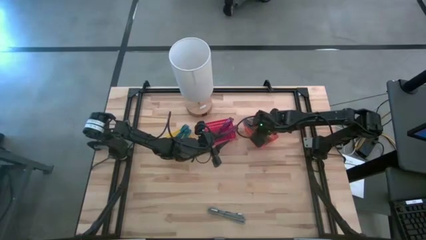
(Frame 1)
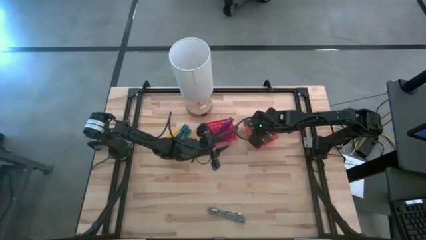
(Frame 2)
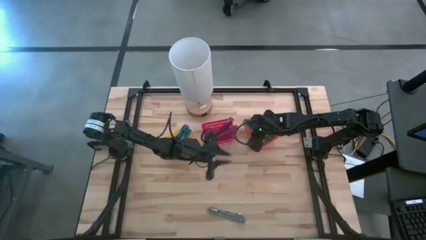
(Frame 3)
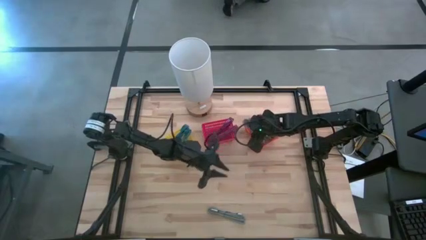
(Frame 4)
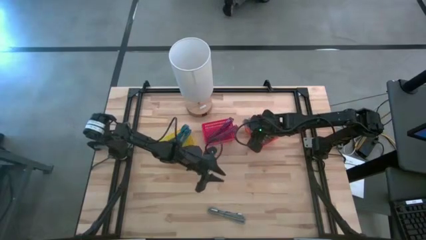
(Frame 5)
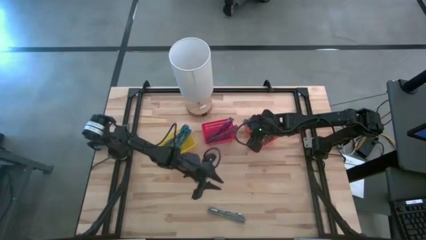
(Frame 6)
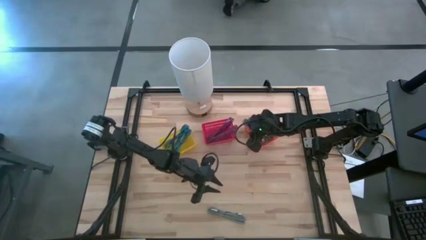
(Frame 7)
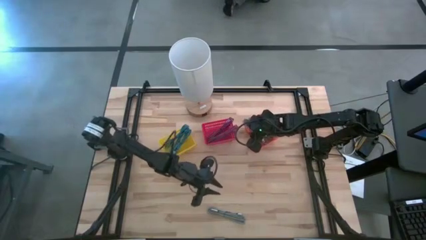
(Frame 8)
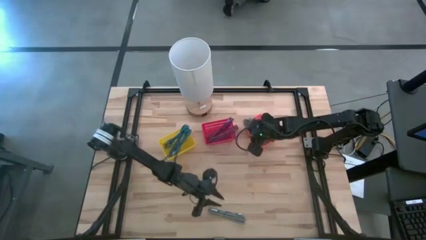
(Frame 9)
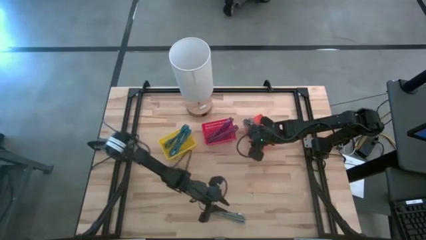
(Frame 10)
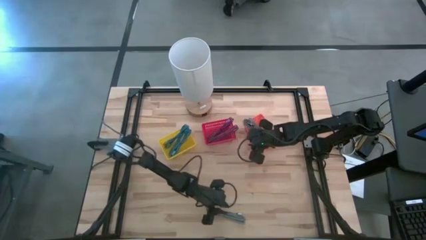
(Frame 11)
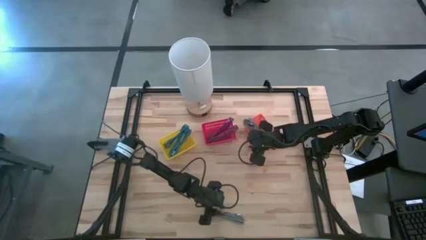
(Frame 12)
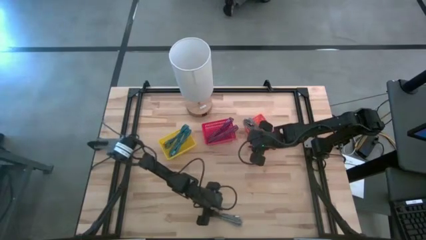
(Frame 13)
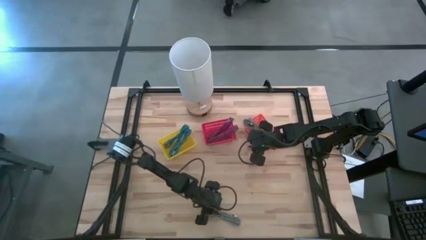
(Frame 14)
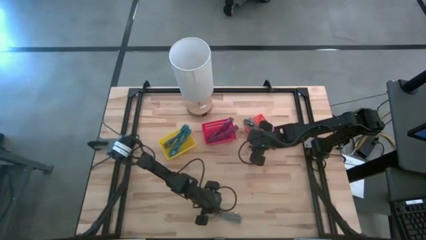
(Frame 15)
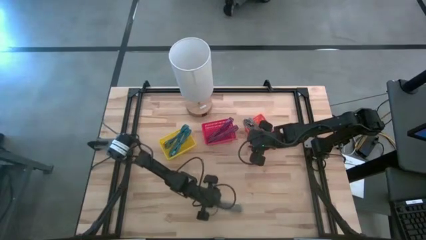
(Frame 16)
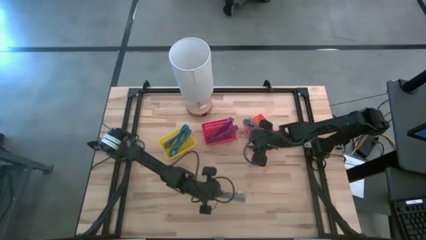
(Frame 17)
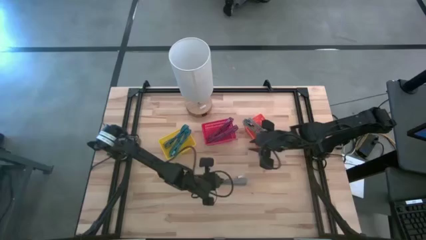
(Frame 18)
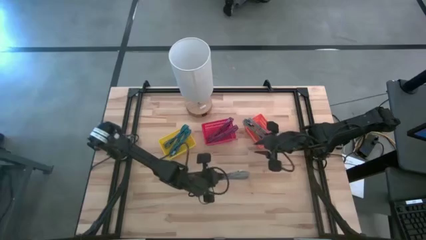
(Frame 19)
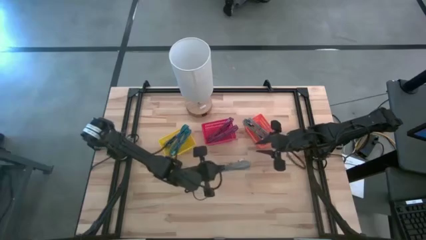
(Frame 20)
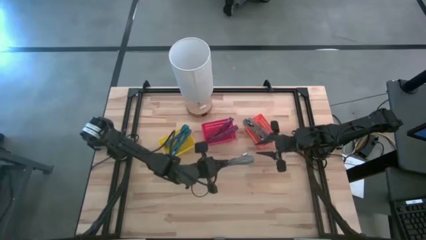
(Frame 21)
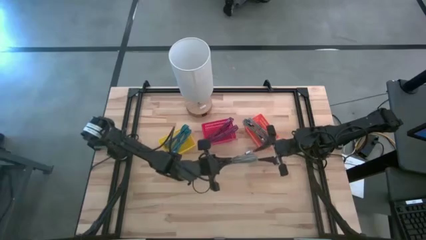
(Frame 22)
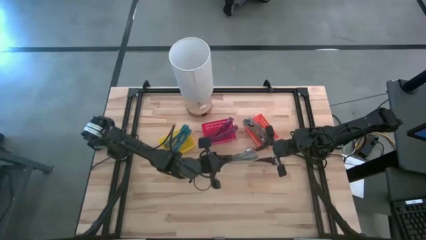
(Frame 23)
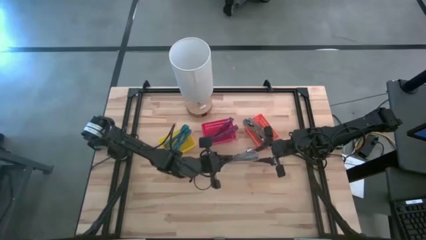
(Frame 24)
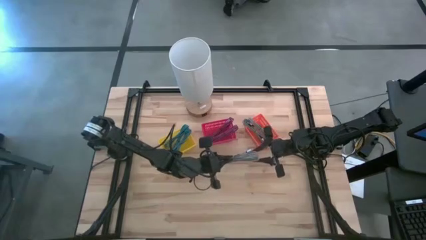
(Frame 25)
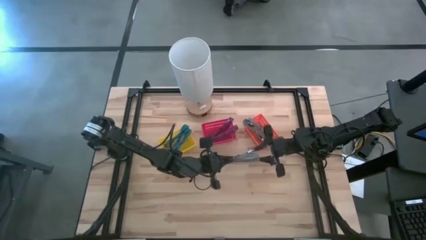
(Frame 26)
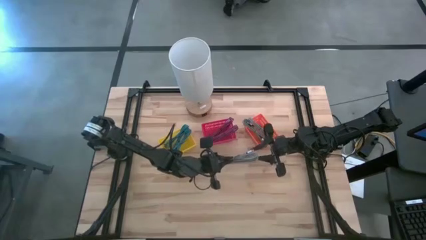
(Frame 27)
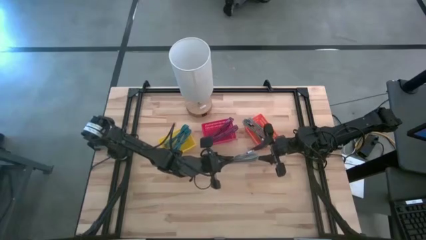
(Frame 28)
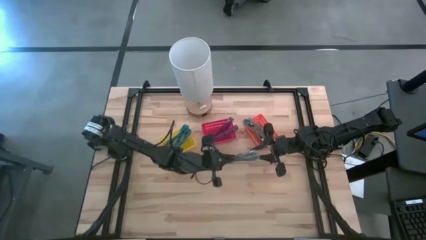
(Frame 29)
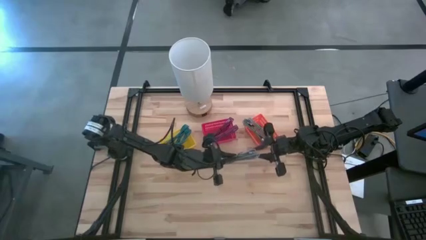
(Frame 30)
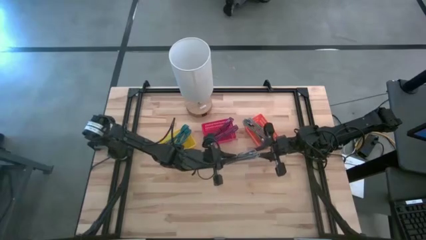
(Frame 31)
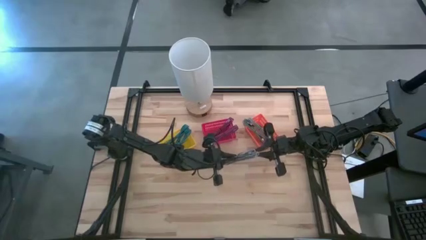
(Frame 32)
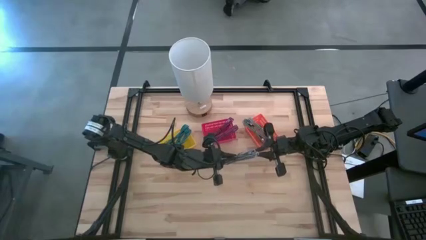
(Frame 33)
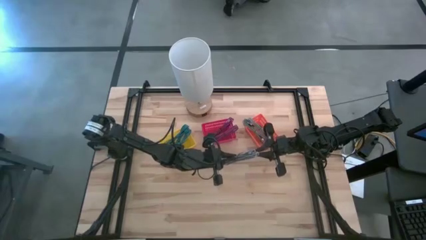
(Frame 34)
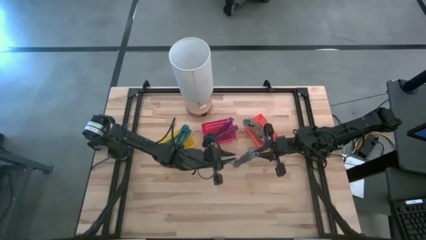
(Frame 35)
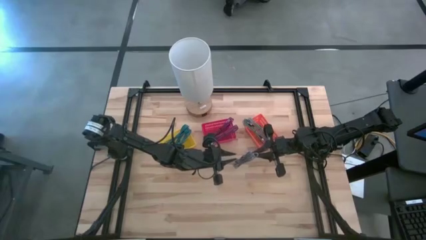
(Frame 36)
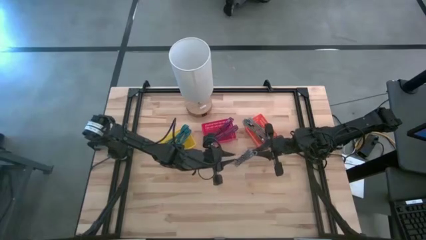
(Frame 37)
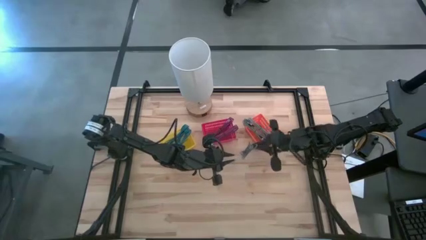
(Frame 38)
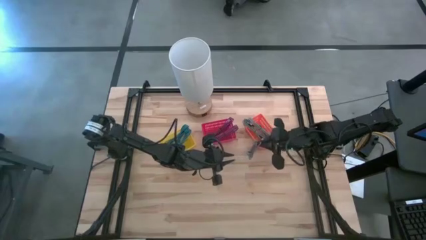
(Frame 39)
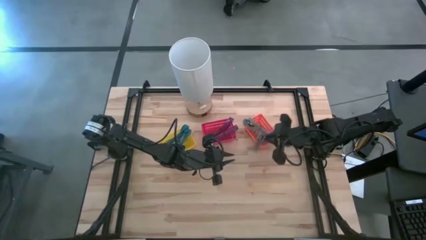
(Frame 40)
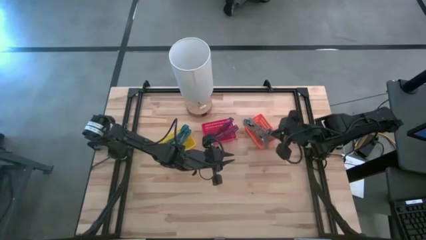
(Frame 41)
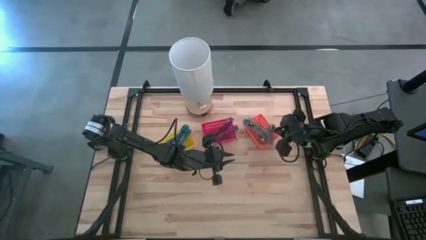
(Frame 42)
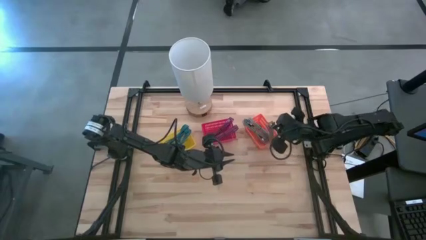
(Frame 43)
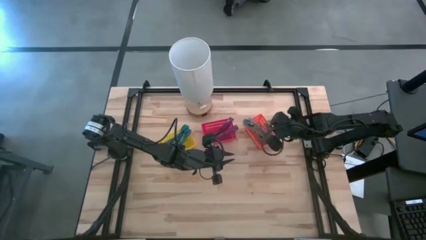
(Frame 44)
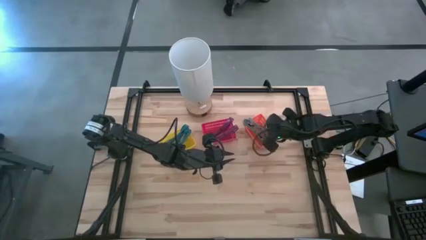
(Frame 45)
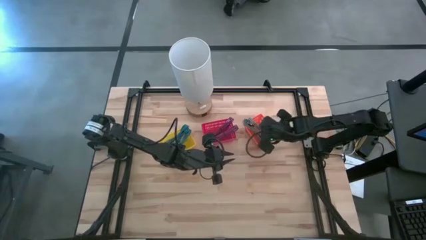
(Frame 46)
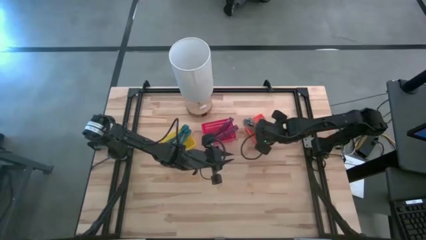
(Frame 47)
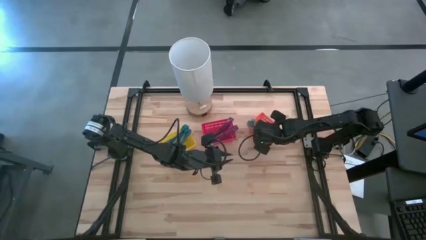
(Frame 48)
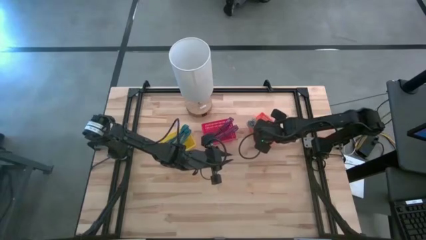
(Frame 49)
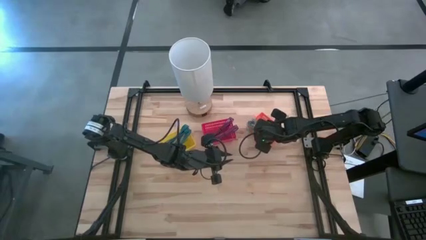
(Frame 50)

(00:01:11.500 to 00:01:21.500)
Task: Pick & Place USB Port
Put the black and white charger cable into the orange bin

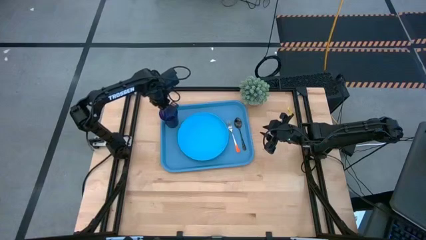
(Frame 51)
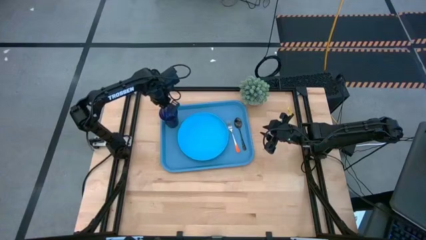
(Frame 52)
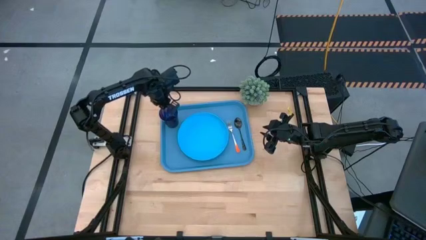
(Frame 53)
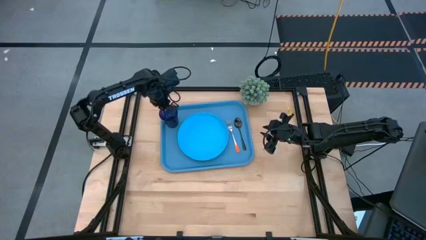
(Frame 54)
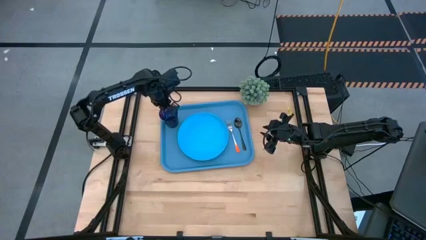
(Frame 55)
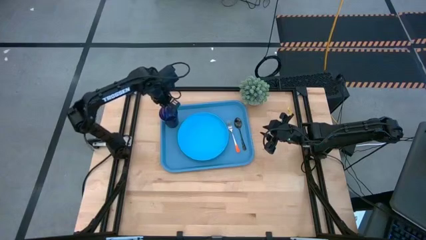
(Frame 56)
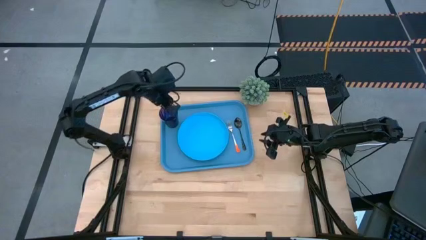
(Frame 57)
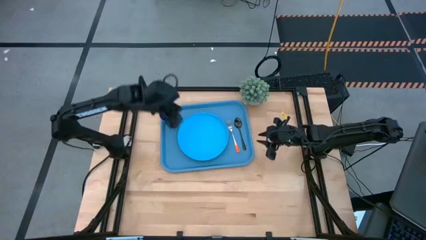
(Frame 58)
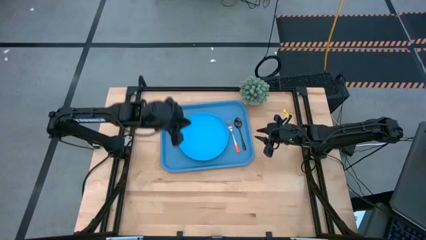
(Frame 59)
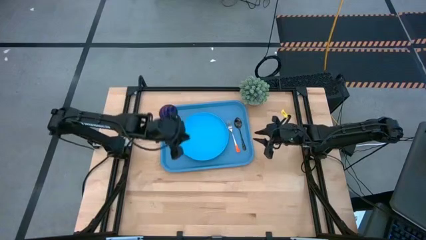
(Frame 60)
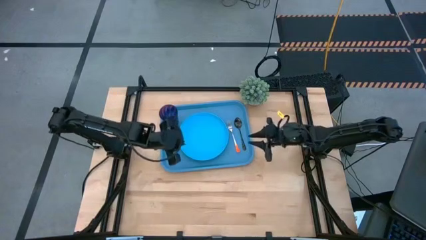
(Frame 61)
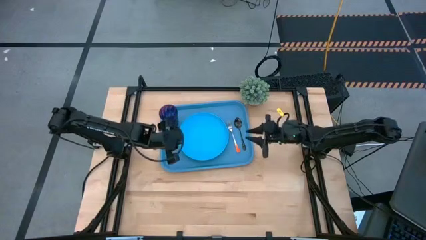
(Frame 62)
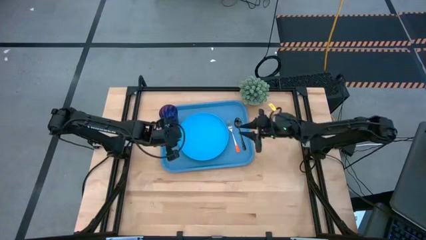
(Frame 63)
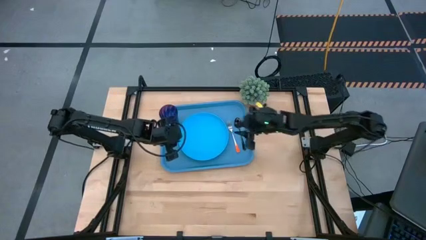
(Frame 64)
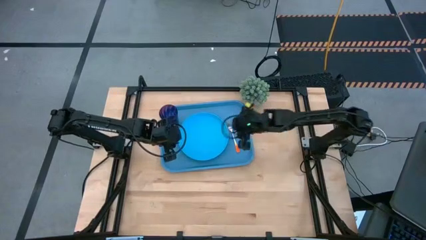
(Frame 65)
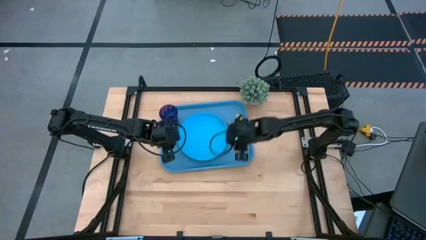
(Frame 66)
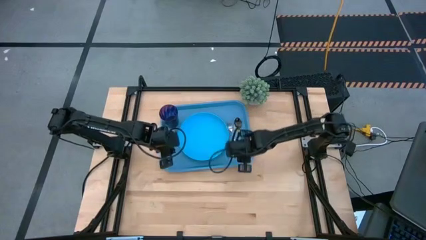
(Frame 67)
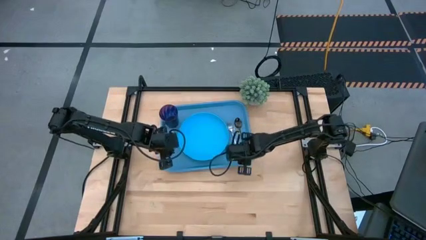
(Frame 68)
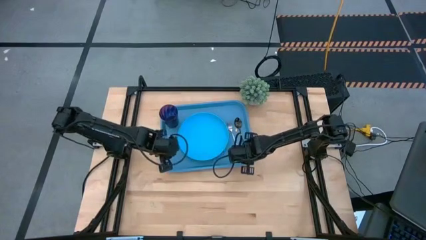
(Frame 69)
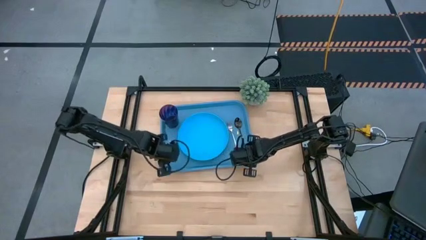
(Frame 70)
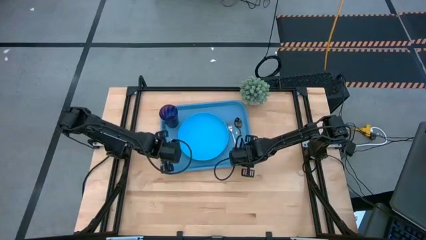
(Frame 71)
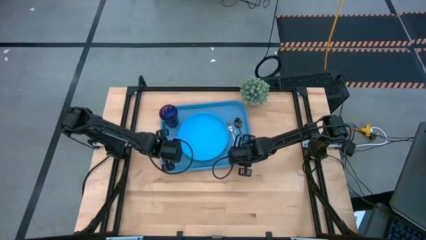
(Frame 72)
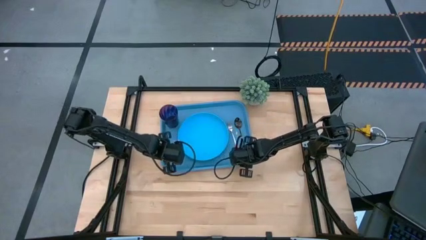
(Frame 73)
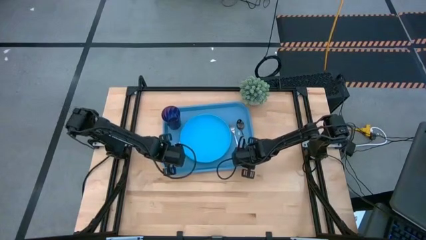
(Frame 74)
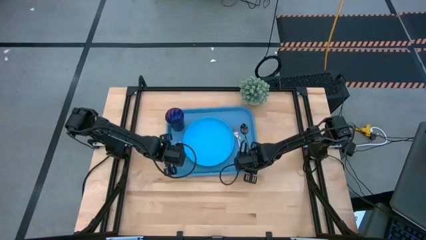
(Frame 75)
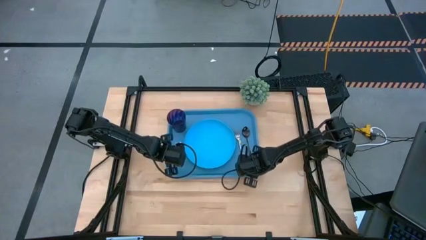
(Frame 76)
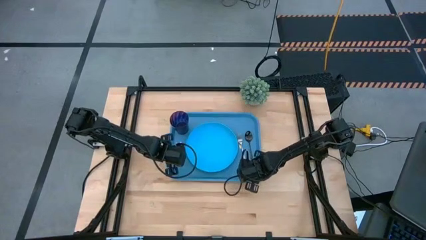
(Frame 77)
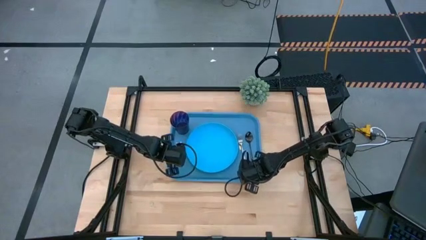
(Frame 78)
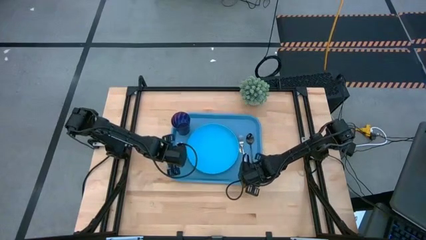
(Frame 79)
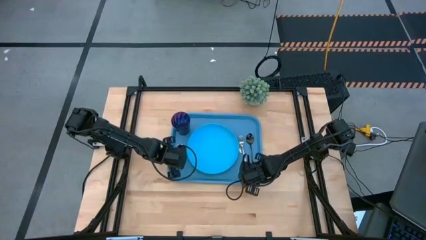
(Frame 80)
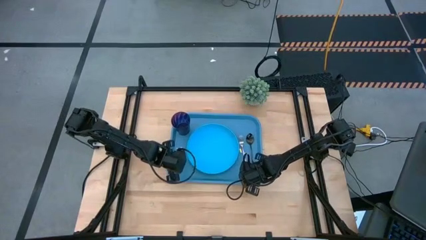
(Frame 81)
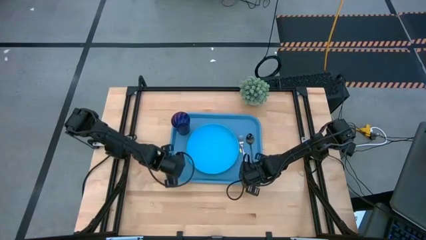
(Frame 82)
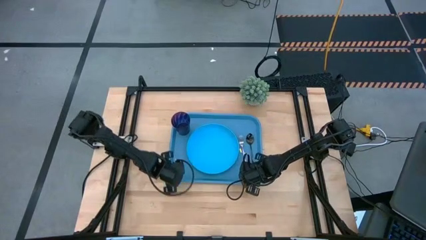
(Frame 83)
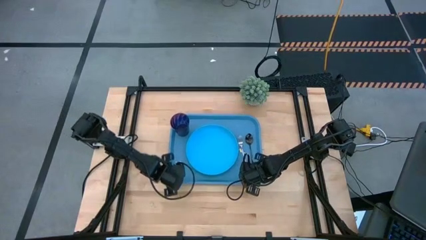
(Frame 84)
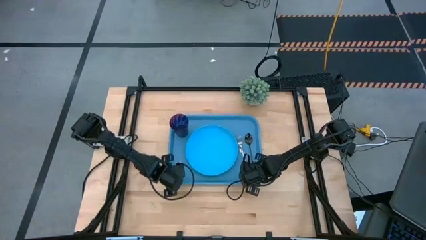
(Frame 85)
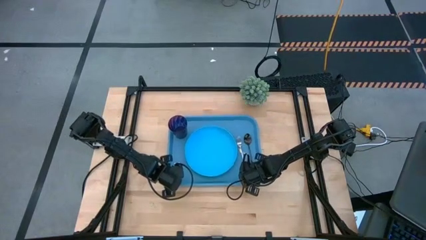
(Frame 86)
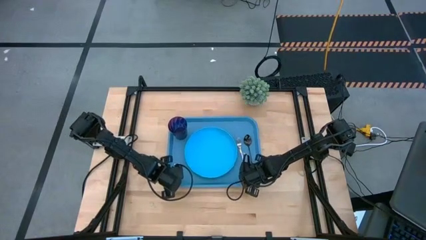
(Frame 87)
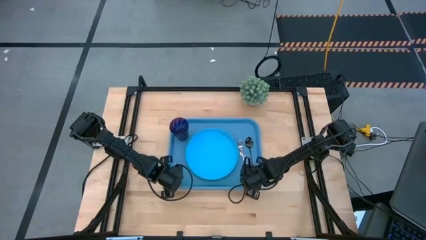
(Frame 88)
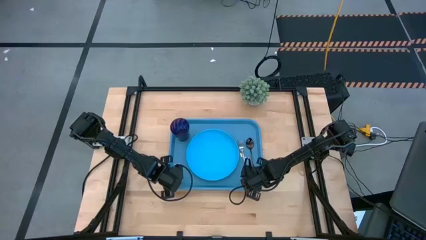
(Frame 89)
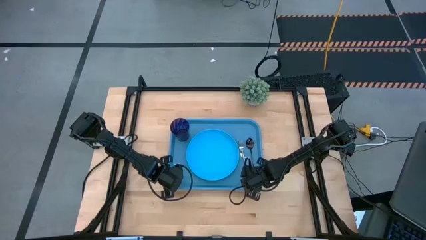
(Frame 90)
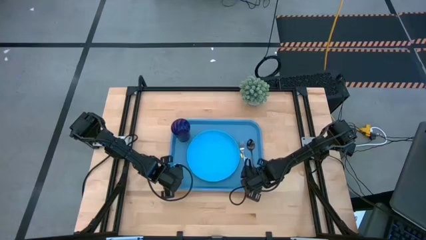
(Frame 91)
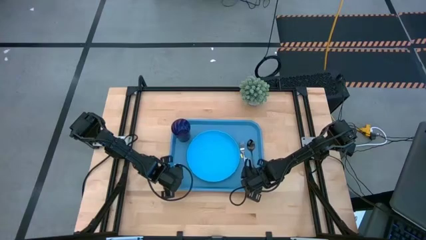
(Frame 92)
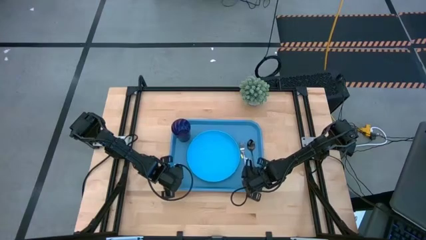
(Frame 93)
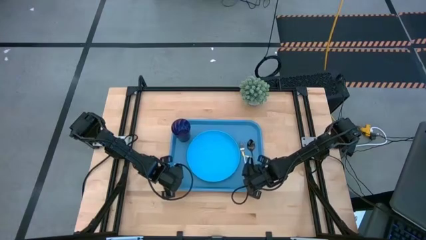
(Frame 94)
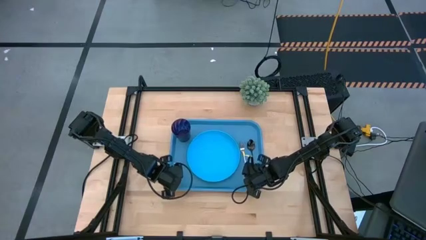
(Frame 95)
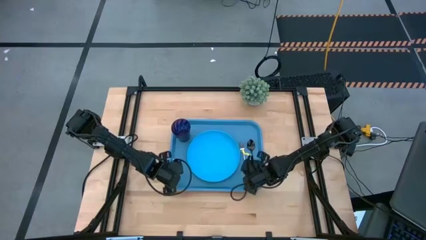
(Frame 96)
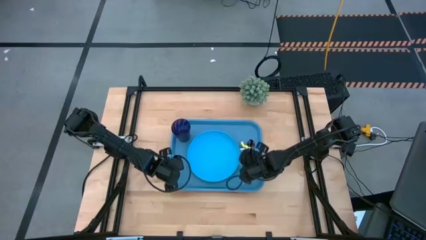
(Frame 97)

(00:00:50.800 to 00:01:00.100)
Task: Pick and place plate/cup/fork/spoon on tray
Move the blue tray to the center of the table
